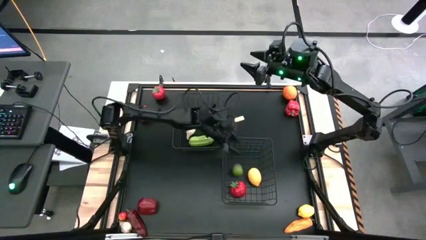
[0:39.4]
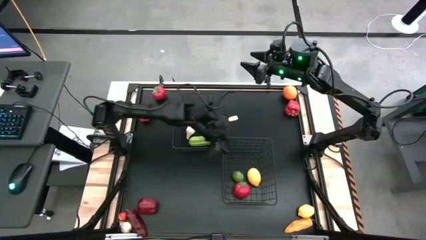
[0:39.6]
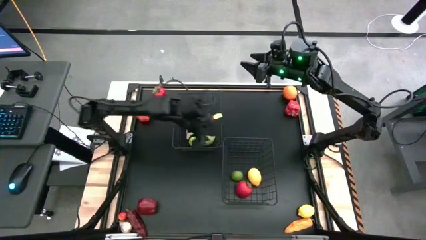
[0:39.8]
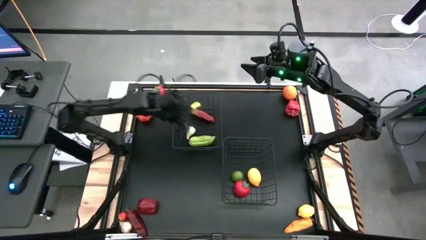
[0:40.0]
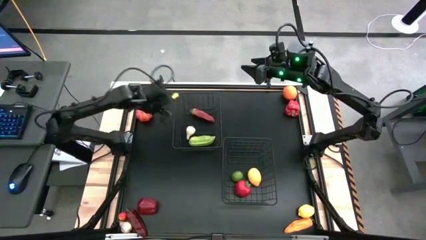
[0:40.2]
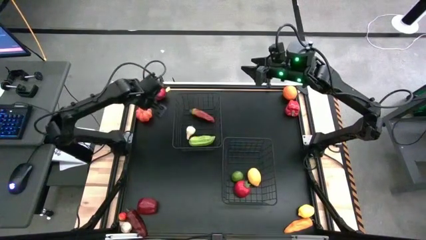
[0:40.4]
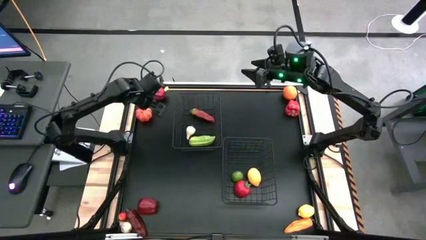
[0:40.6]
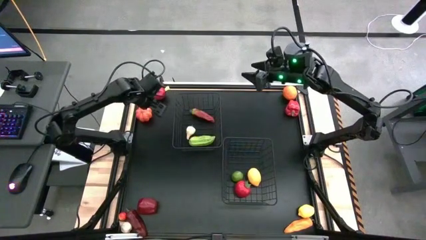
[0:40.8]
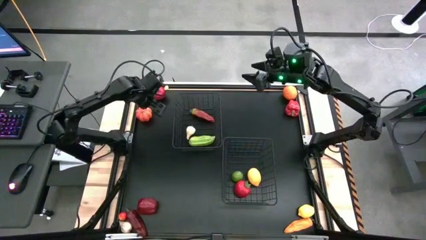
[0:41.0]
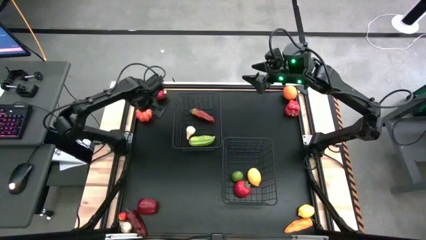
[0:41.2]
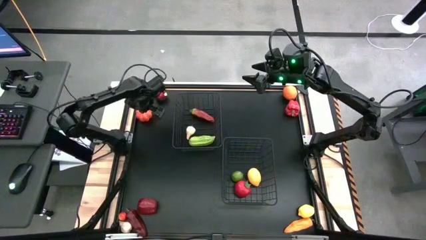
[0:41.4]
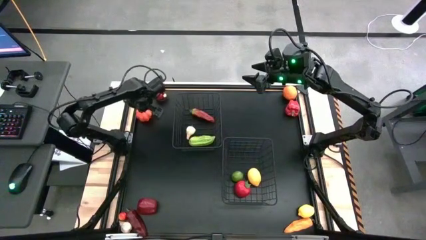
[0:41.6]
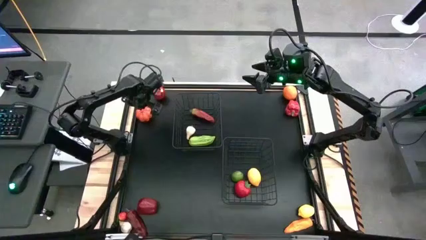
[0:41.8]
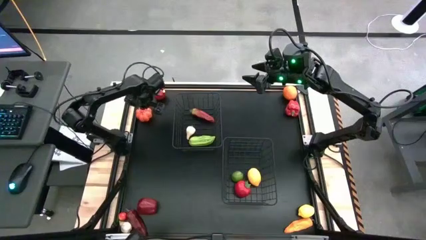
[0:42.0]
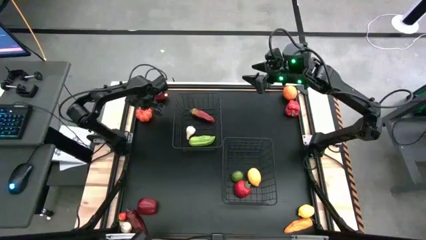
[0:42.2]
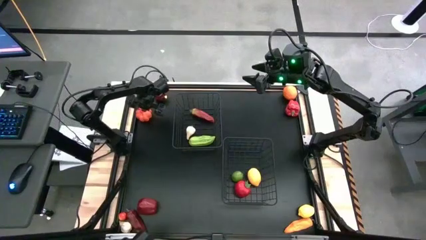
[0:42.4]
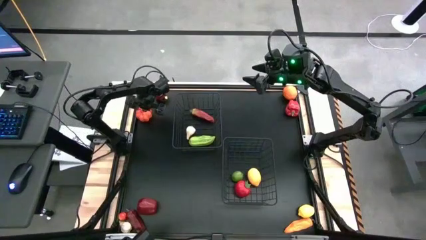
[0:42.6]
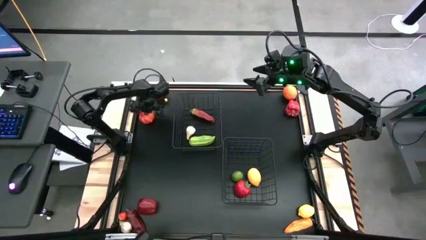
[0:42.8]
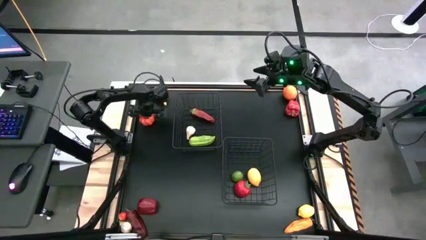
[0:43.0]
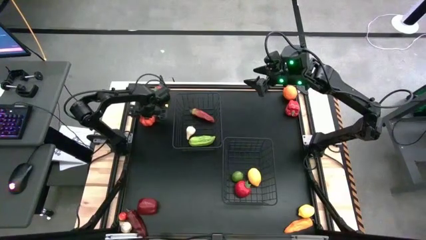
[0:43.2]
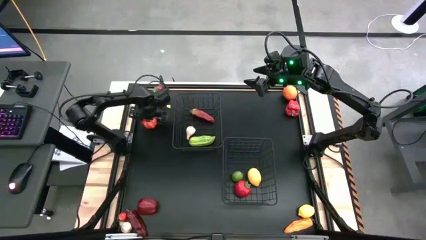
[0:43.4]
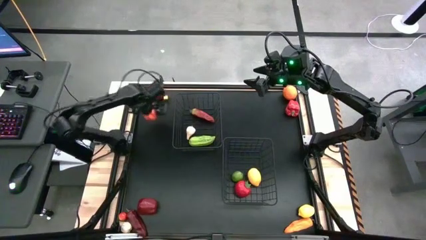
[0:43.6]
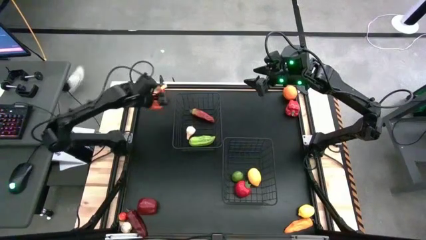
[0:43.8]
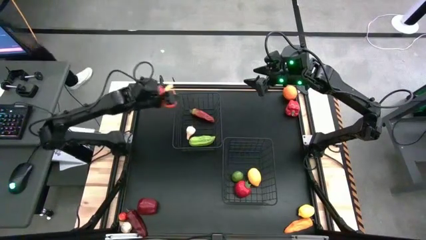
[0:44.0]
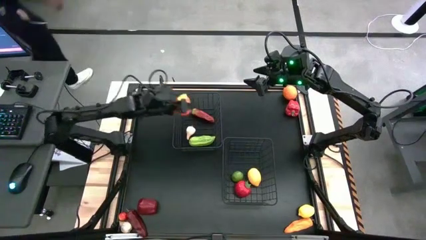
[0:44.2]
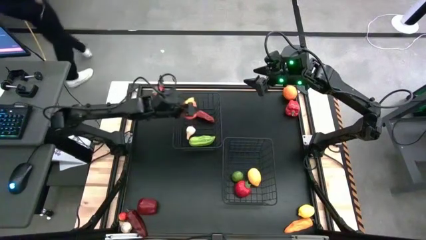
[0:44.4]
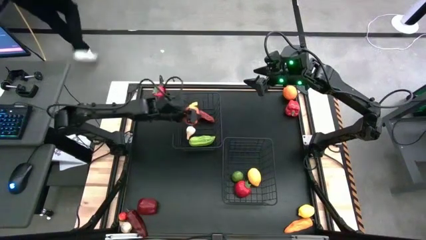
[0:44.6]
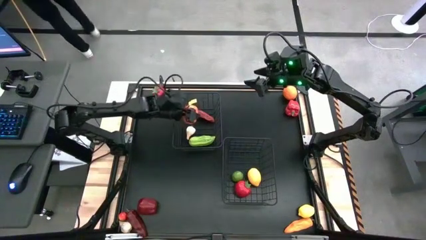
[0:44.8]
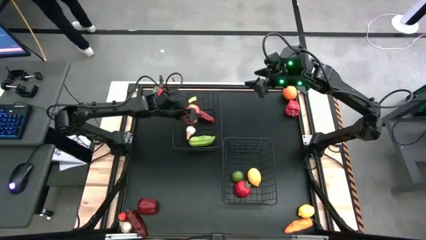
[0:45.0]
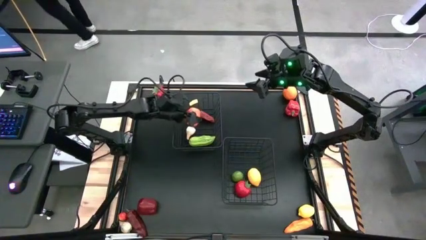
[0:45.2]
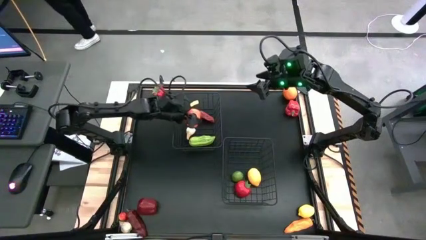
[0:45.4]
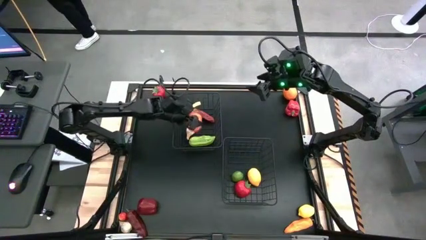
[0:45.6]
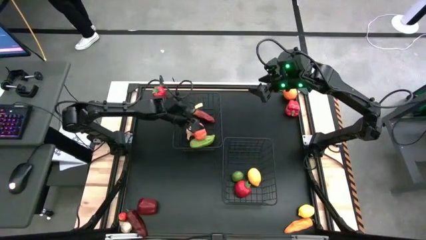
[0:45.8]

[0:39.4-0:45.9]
Task: Sort produce into baskets
Put the orange pumpkin into the top black wire basket

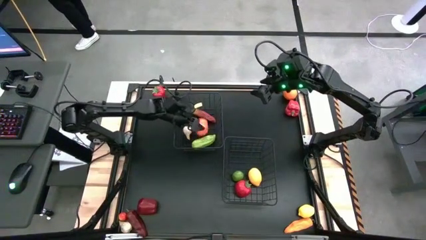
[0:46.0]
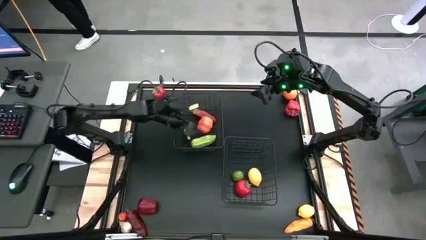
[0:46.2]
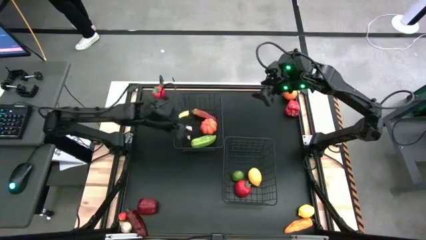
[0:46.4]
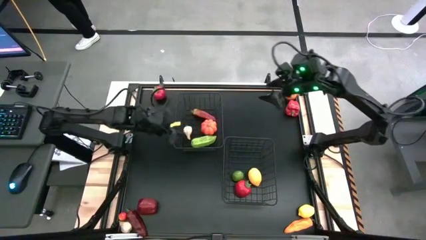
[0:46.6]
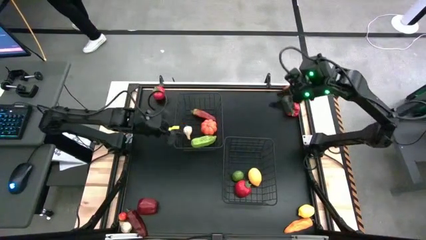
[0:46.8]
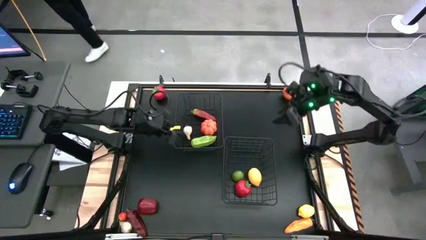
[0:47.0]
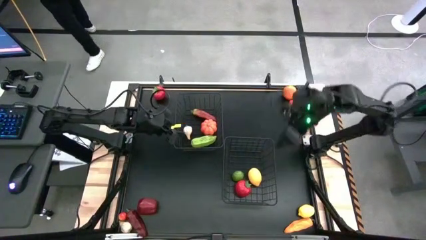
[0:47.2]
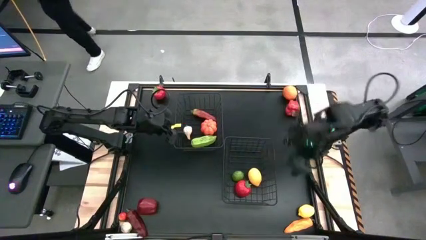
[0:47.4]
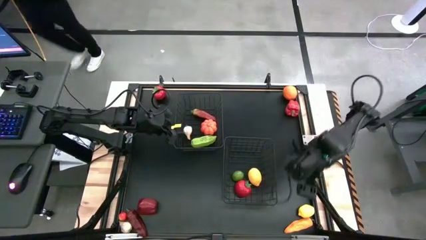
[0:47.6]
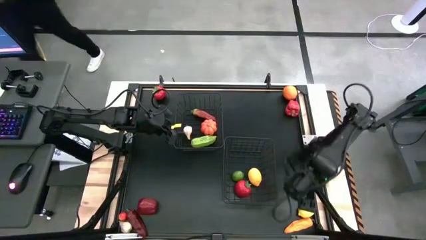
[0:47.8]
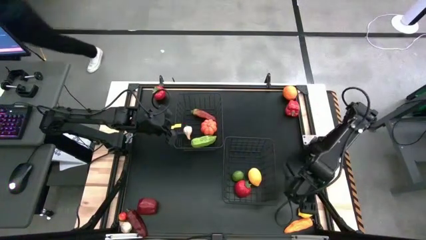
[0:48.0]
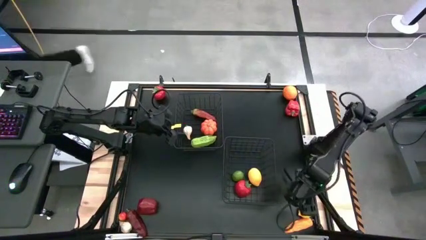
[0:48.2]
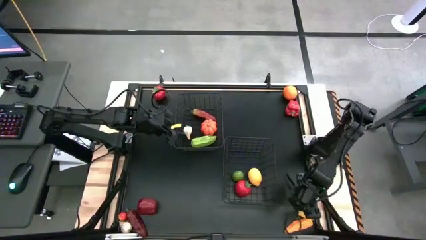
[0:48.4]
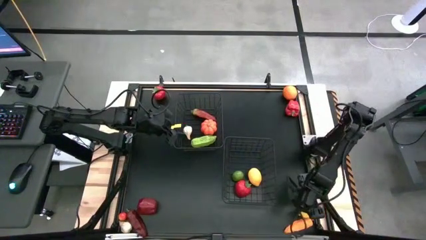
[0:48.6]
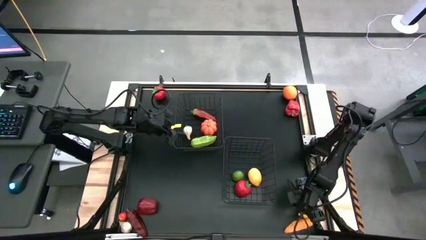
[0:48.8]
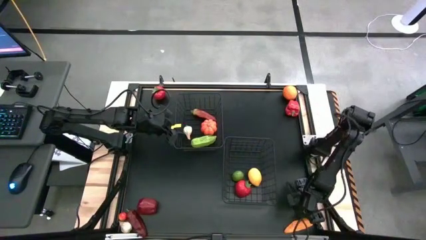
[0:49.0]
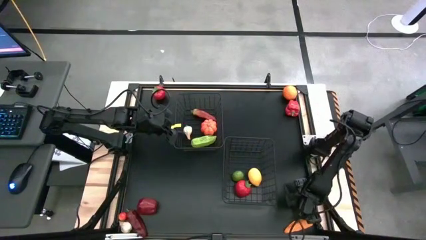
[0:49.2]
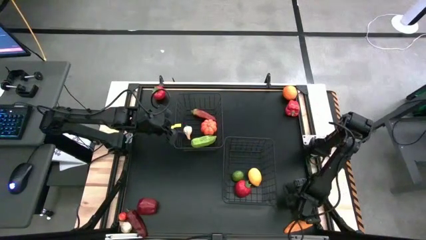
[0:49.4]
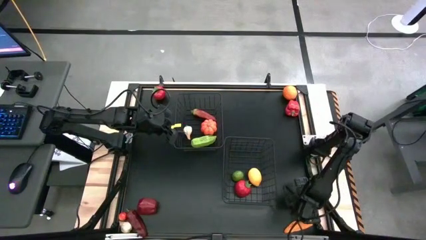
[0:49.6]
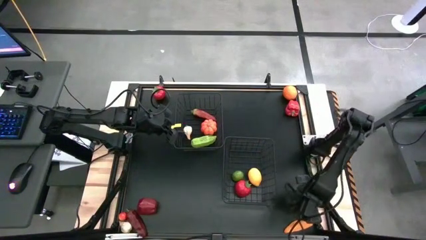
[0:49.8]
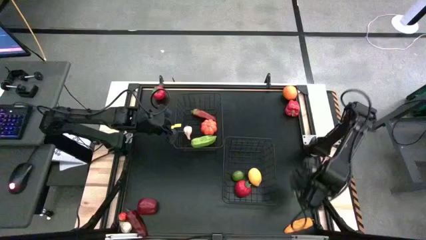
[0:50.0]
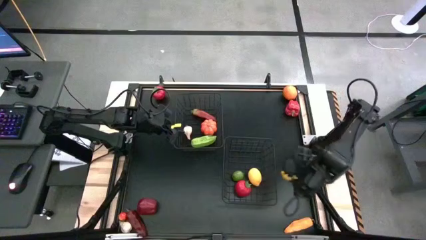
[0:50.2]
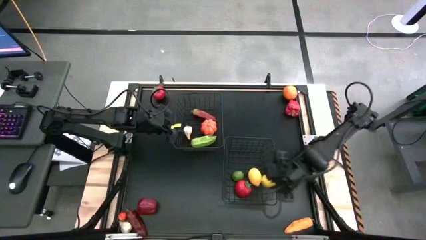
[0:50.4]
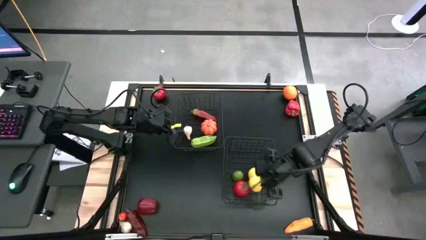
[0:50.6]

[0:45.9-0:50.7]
Put the yellow lemon into the bottom black wire basket

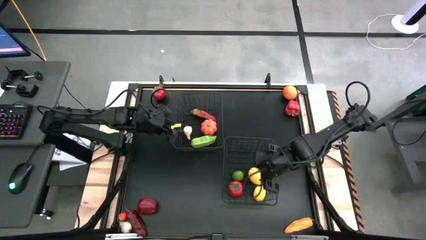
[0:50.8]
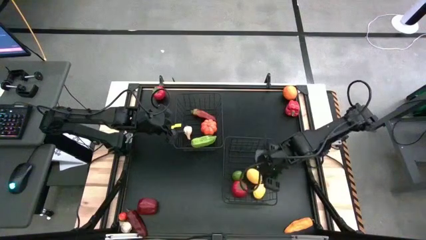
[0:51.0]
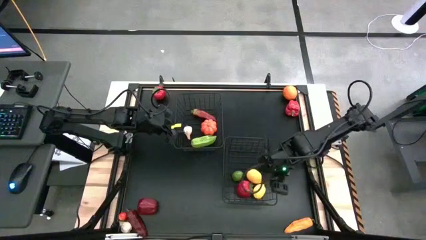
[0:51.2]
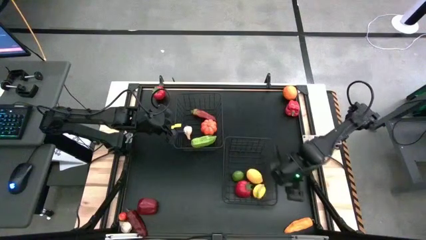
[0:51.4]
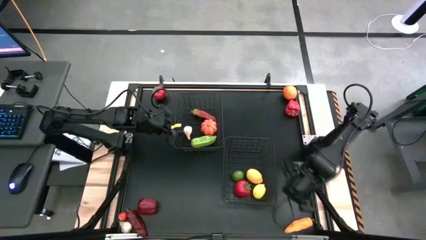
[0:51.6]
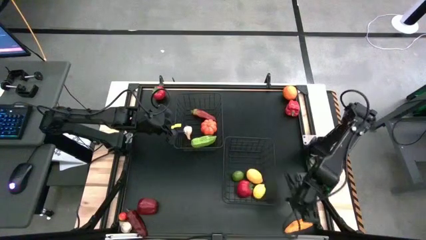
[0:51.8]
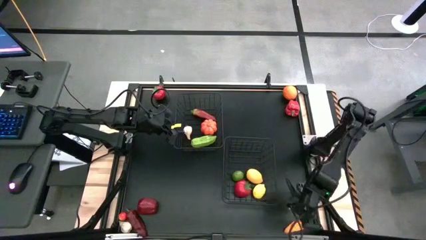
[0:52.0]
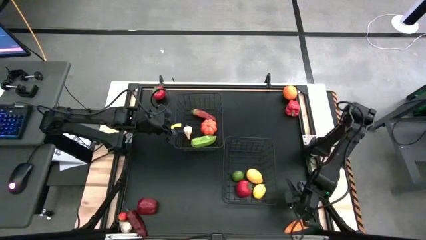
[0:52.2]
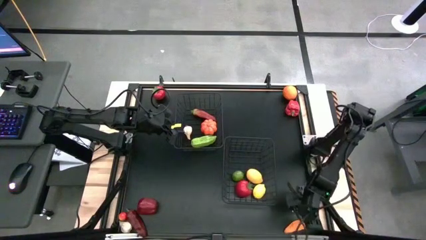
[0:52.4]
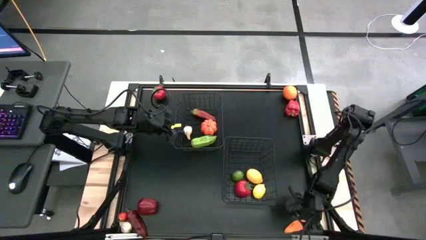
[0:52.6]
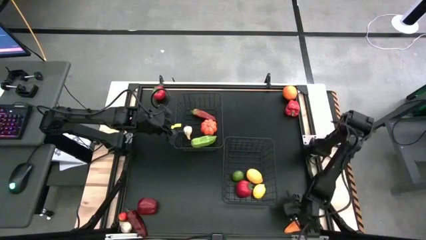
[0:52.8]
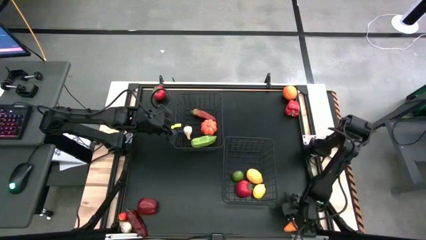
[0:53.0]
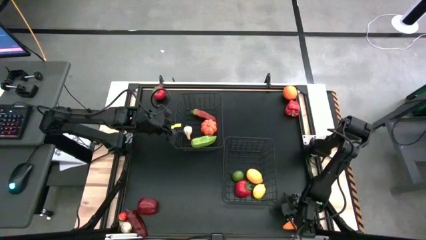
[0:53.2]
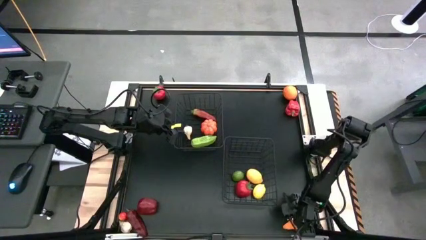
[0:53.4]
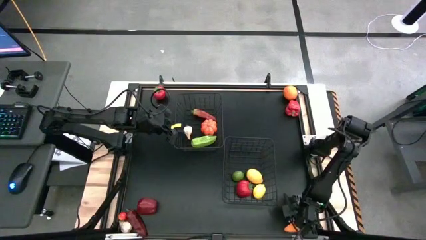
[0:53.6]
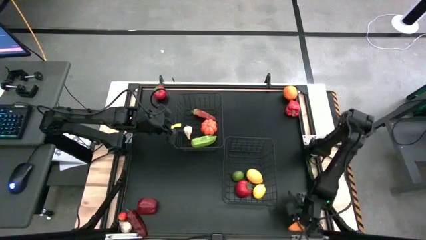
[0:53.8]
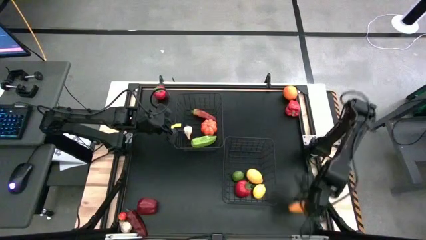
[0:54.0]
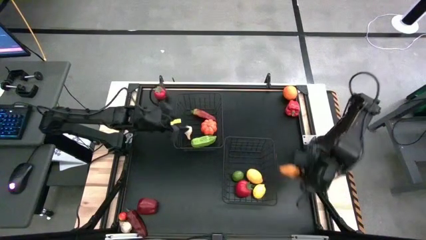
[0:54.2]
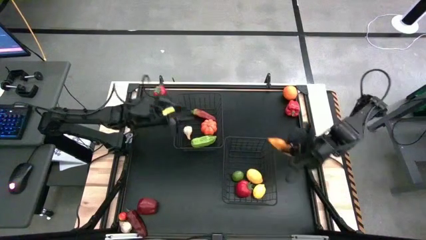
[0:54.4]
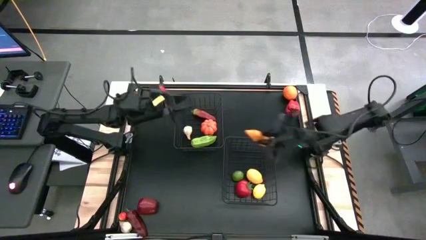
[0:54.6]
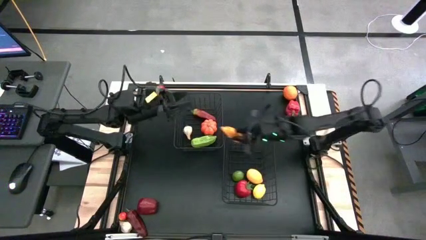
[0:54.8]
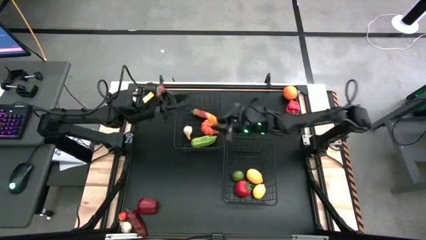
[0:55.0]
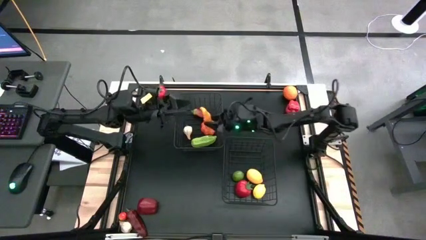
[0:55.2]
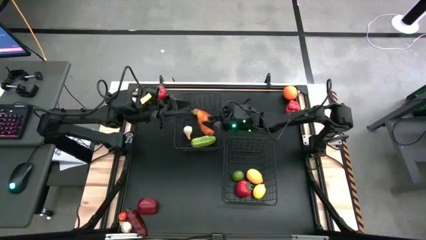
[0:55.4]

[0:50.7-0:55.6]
Put the orange chili pepper into the top black wire basket

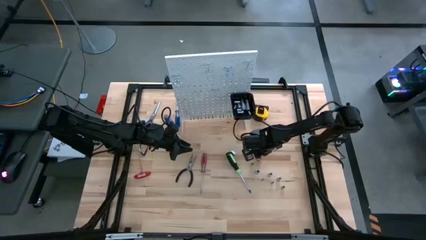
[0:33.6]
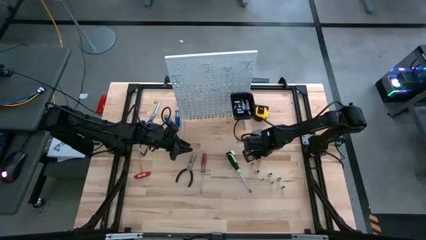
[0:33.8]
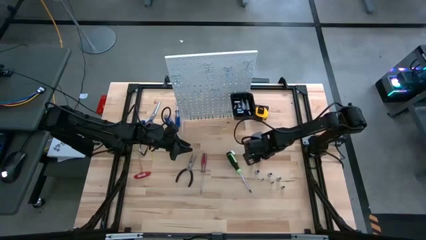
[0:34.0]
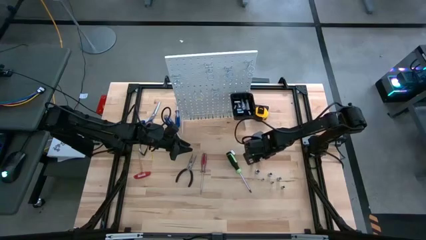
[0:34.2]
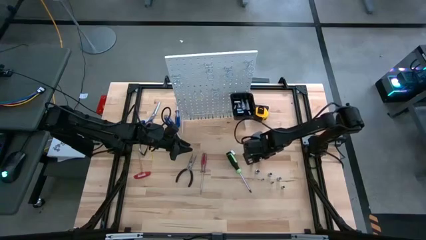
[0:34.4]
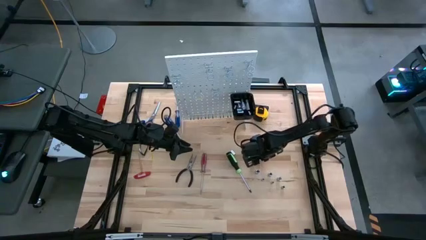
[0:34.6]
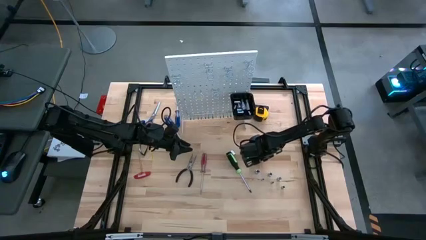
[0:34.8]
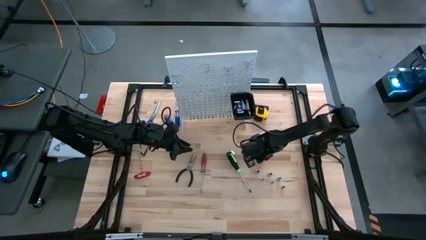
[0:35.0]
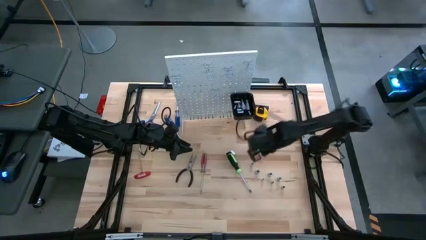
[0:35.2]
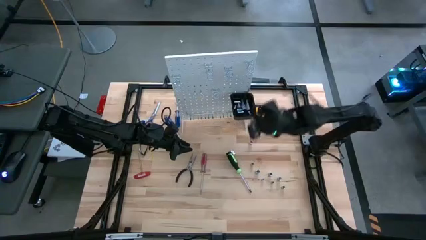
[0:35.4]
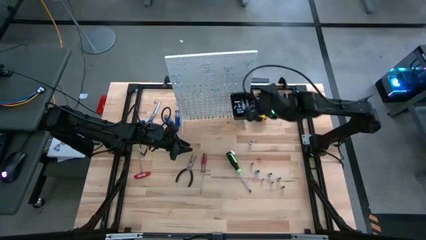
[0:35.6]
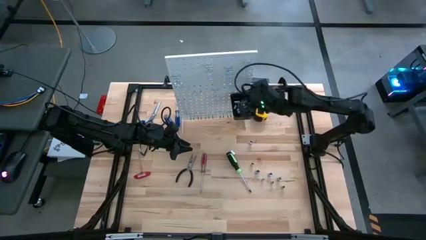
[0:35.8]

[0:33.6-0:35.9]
Task: Hang tools onto peg board
Put the silver socket into the black bin on the peg board
